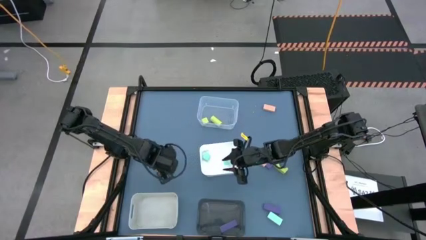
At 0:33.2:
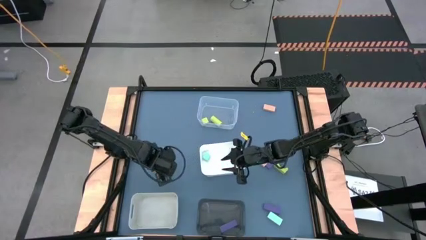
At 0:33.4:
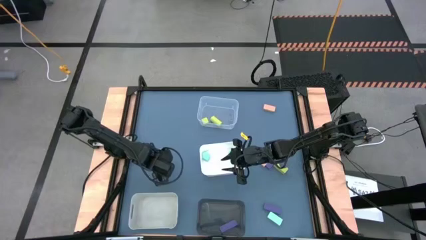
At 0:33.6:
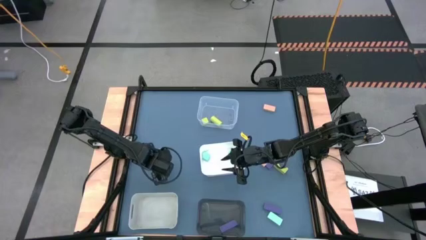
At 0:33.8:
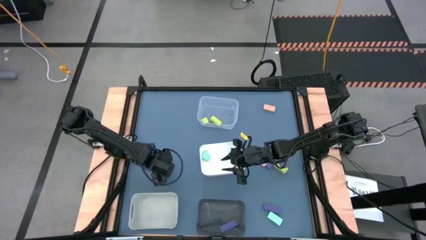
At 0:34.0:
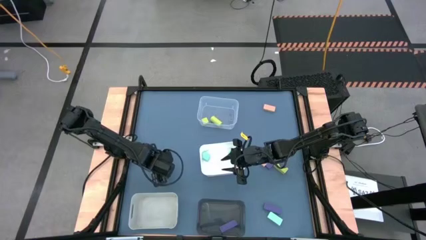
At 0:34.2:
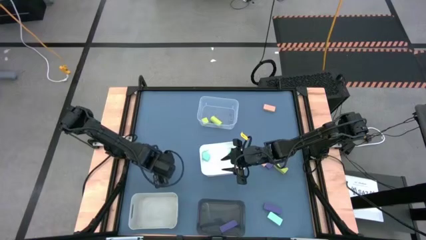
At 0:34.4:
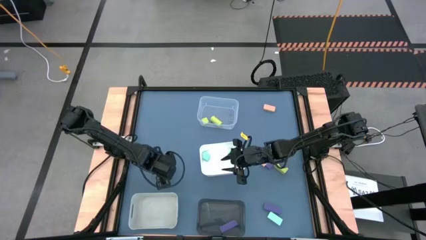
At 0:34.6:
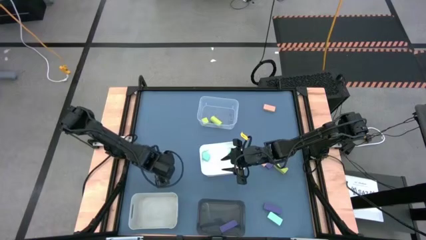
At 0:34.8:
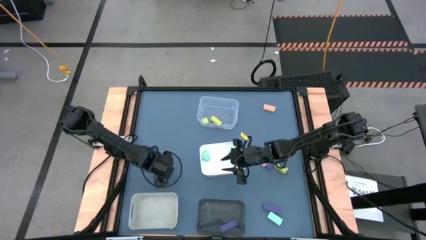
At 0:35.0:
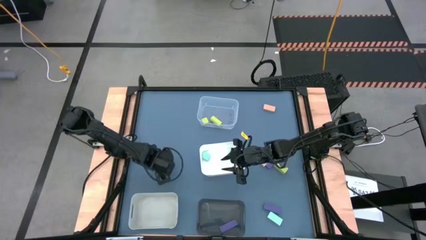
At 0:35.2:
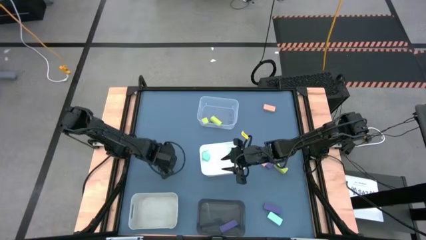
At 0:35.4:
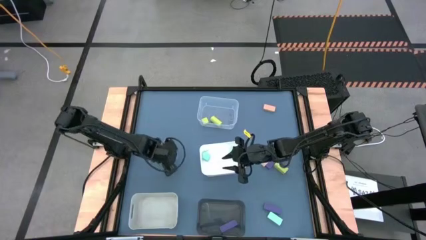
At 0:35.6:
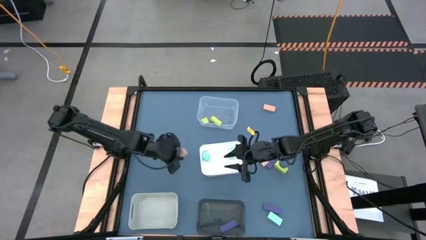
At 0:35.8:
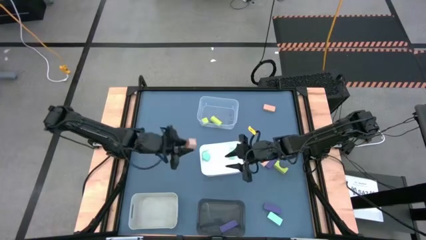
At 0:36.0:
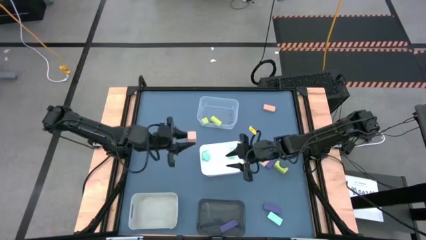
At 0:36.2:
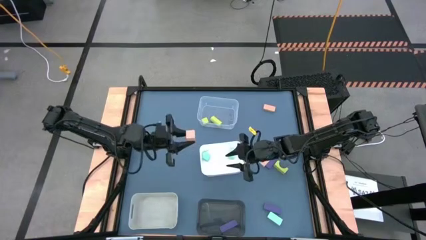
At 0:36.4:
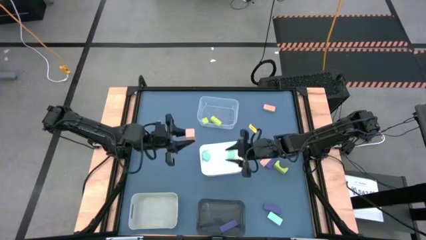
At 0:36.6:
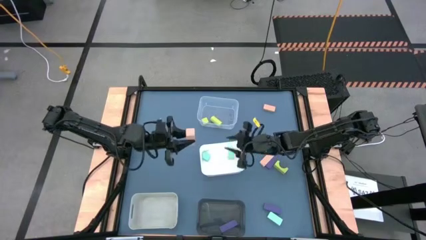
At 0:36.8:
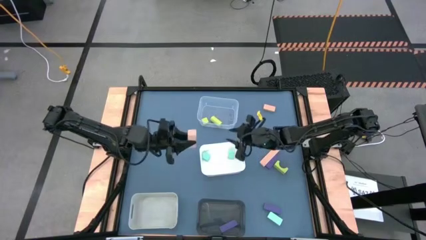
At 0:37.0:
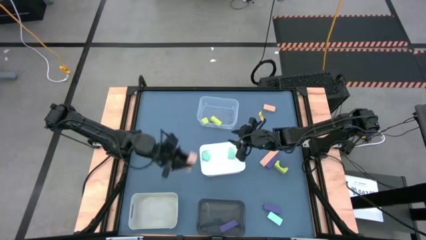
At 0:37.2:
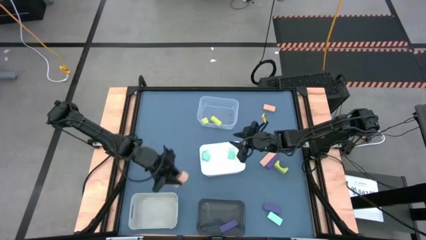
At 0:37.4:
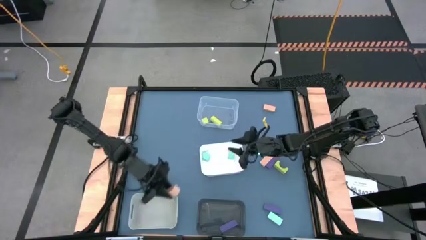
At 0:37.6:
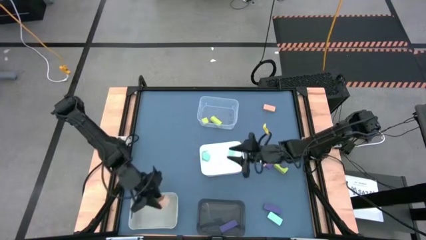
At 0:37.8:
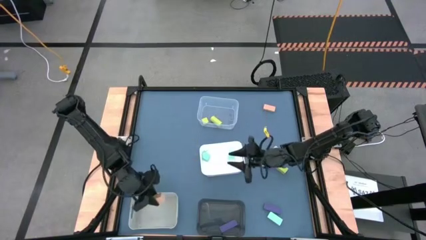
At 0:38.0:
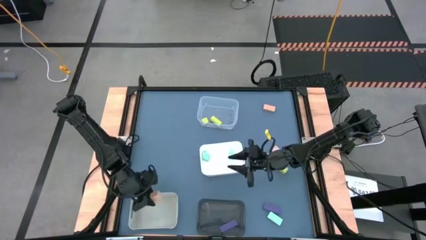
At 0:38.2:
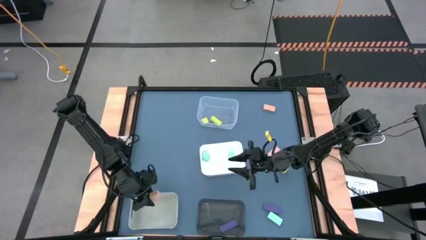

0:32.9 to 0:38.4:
Task: Sort & place blocks by color
Put the bottom left brown block into the light gray bin

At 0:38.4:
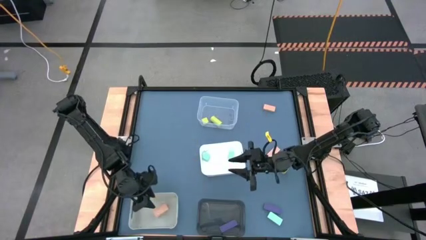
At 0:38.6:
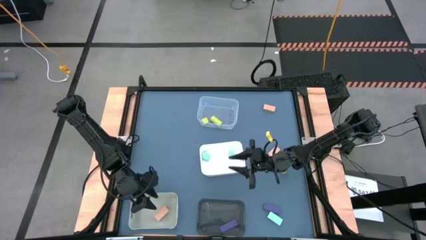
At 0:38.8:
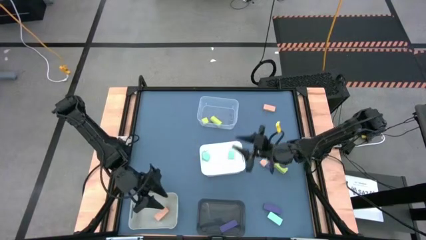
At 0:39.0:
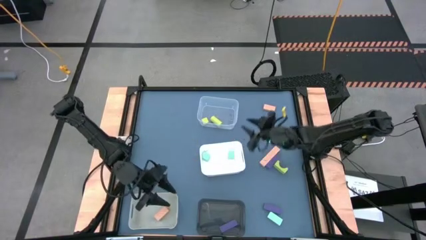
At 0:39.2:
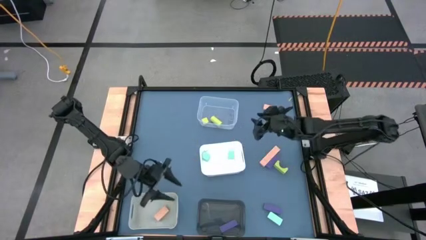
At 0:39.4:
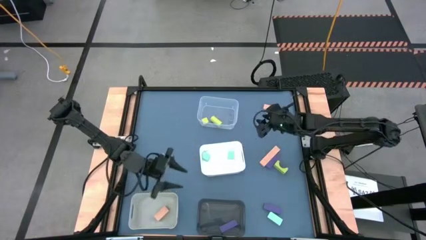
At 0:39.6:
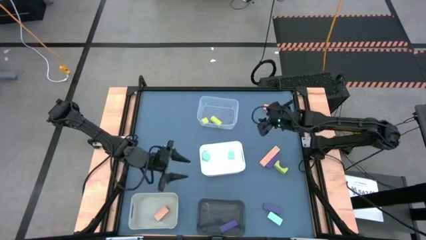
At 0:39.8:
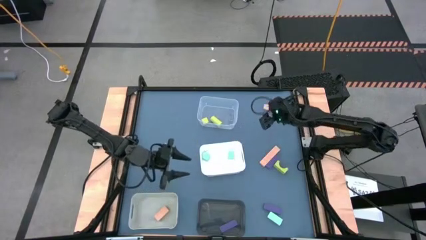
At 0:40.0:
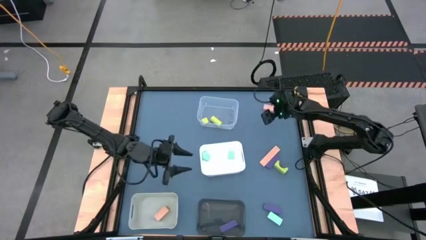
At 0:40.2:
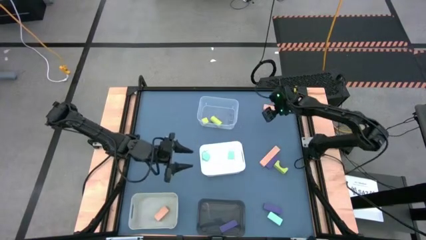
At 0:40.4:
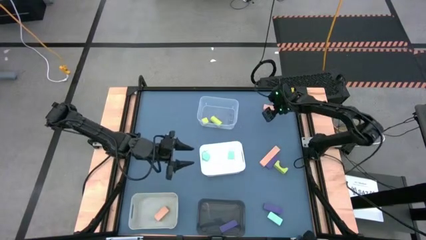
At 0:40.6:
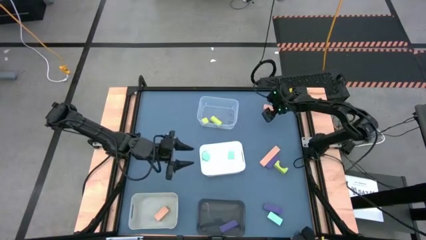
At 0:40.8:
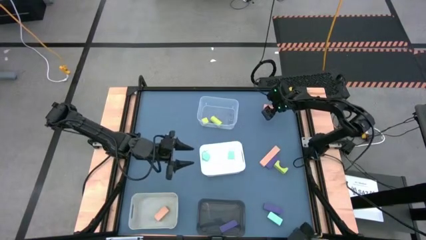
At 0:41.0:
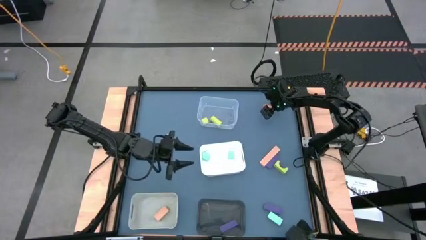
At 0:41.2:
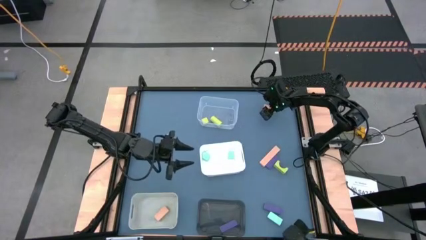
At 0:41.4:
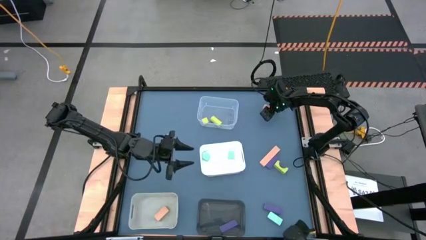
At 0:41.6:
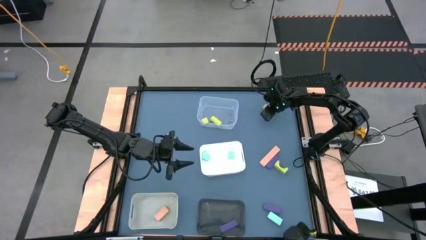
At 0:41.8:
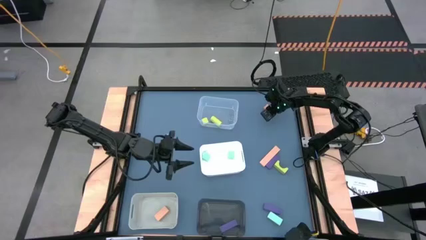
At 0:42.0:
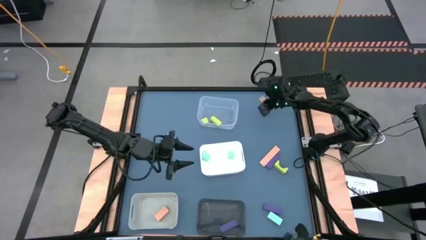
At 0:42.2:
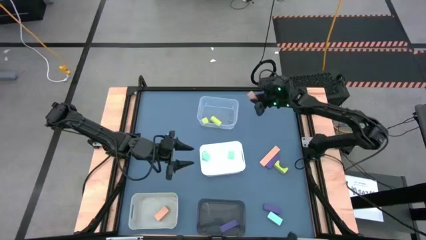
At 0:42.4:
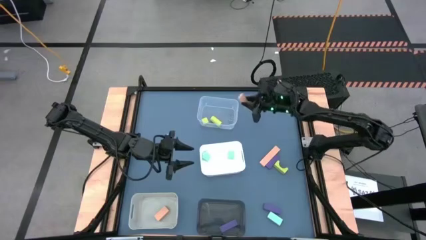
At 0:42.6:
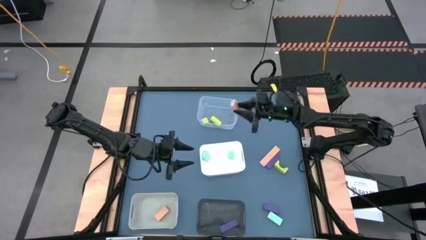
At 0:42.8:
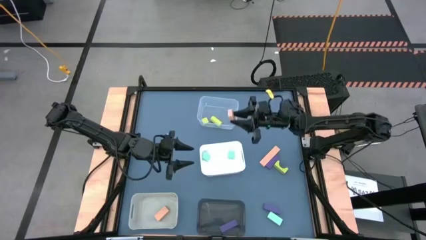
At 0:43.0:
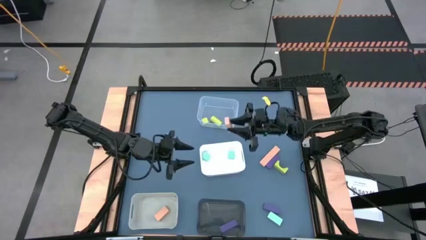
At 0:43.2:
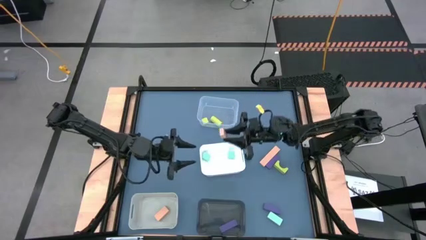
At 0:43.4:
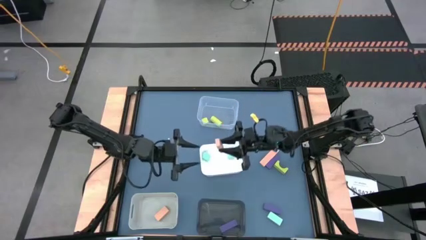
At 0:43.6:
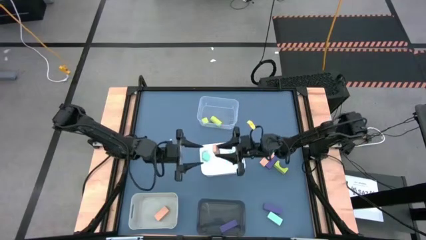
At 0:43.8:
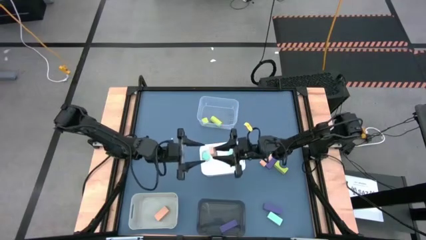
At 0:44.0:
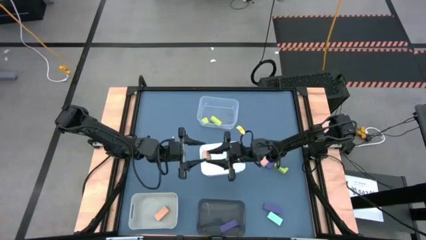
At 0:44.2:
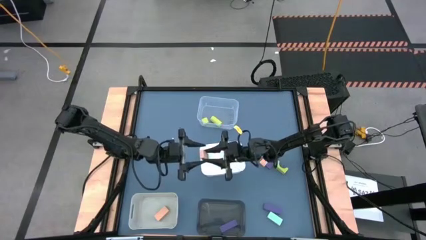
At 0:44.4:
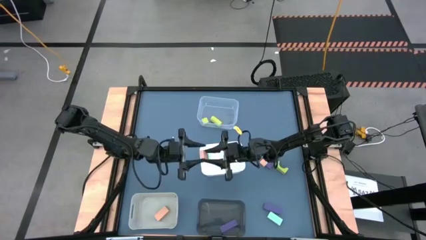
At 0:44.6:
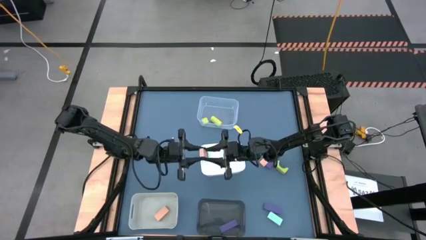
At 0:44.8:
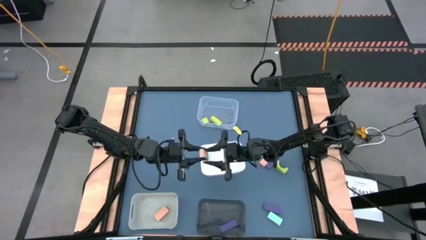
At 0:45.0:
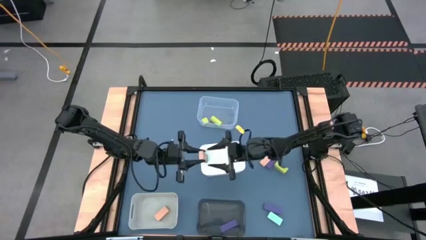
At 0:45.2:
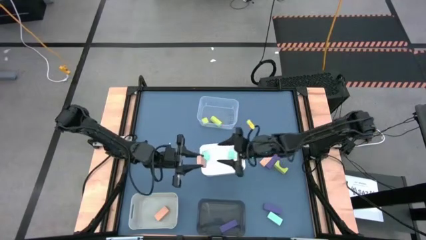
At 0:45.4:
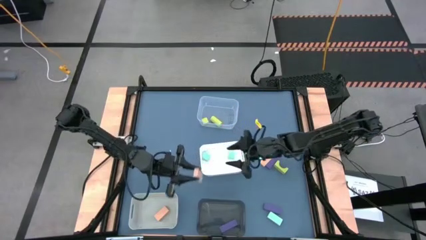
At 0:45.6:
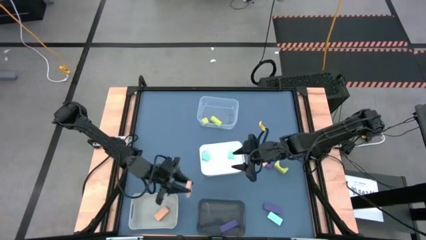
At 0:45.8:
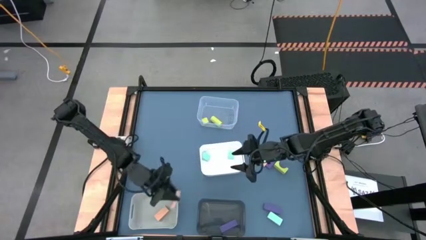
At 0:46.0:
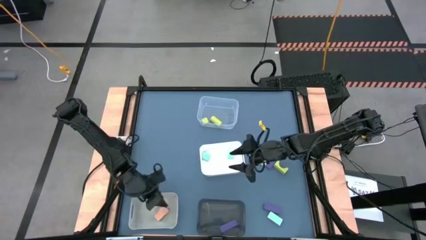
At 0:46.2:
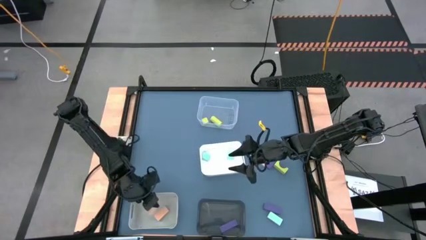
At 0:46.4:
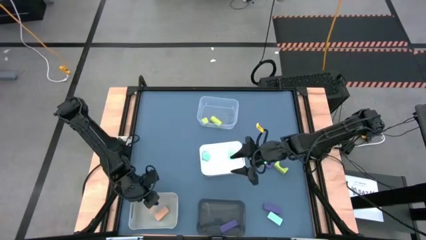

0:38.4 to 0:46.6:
Put the top brown block into the light gray bin

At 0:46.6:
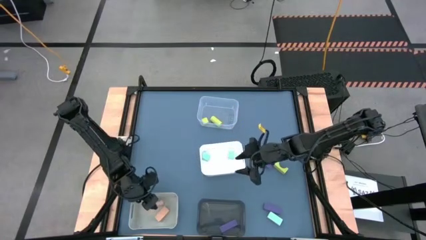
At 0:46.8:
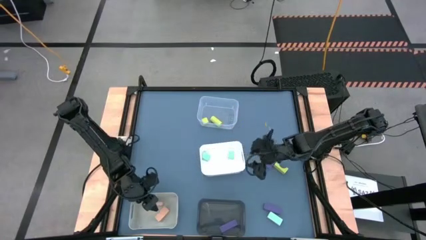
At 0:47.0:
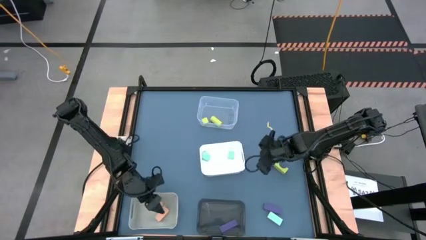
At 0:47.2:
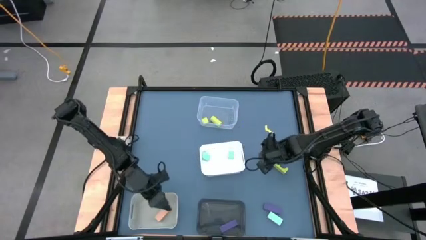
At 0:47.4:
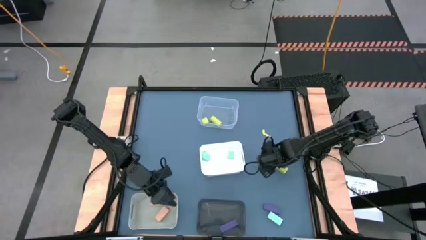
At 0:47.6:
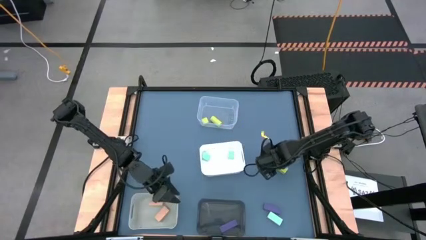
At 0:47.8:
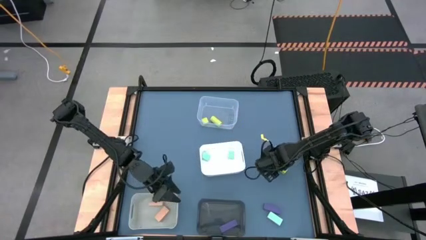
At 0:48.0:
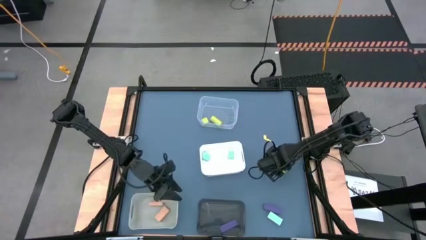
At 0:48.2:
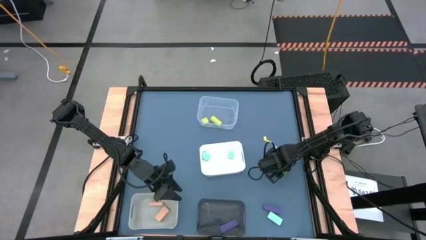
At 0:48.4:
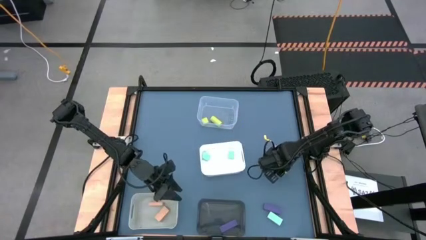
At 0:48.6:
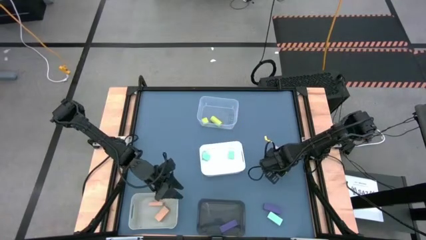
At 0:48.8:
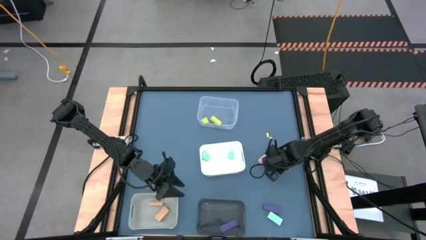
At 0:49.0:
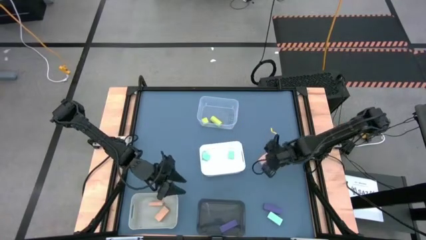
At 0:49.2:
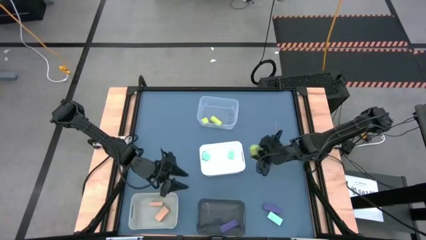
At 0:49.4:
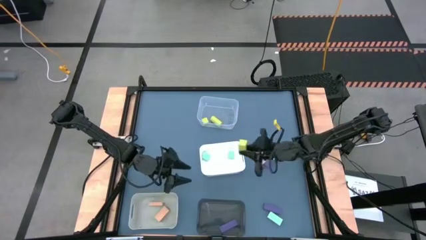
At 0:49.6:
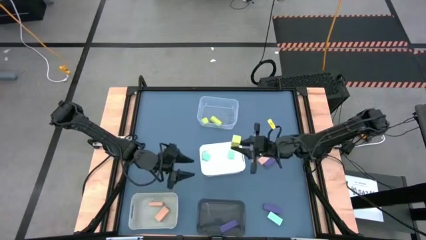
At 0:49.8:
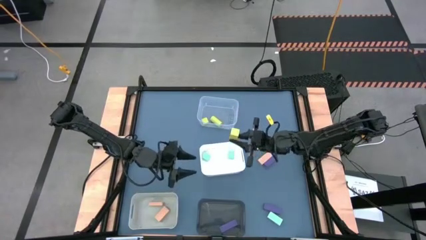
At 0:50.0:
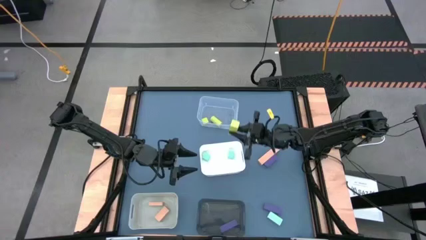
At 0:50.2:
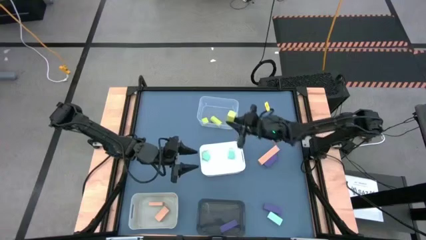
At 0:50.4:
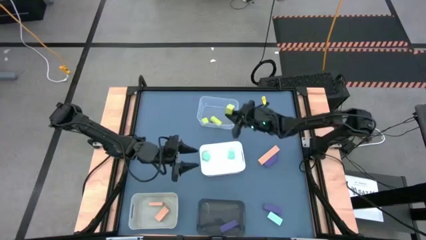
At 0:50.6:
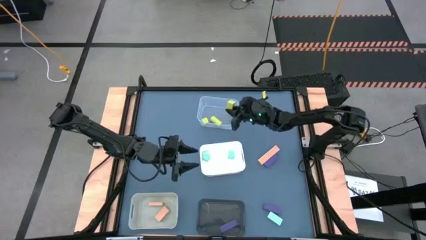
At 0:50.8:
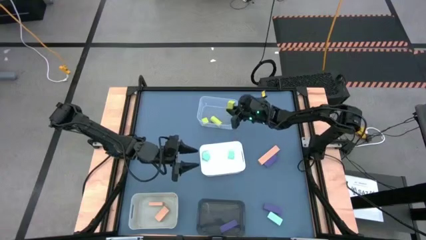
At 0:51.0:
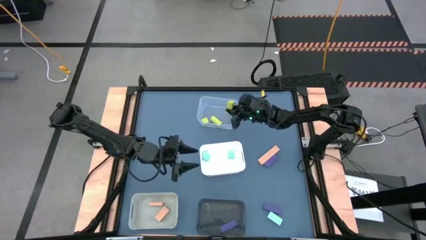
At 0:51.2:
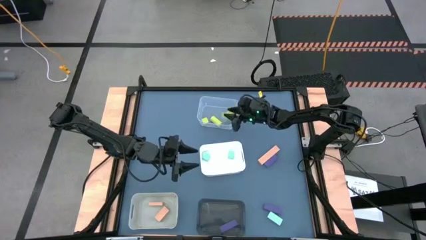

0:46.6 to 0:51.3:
Put the green block into the transparent bin
